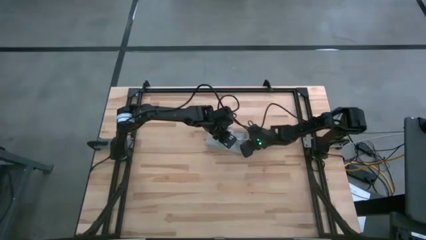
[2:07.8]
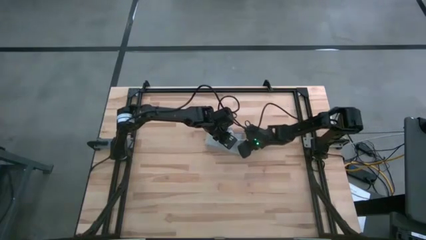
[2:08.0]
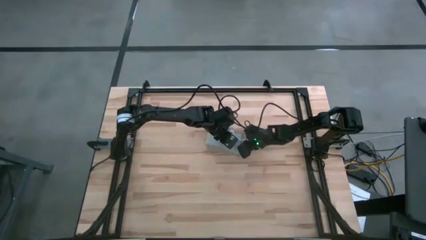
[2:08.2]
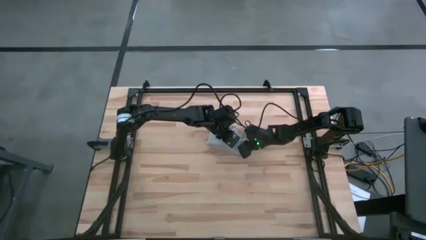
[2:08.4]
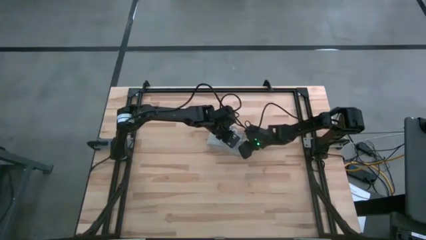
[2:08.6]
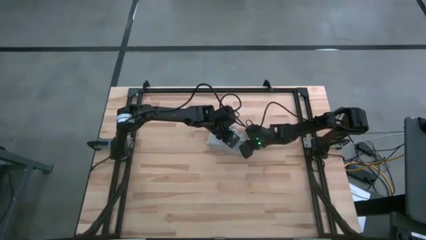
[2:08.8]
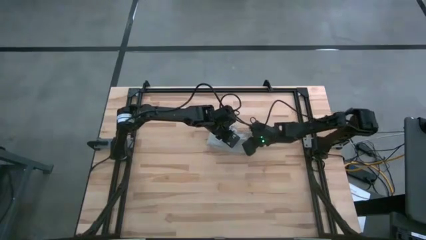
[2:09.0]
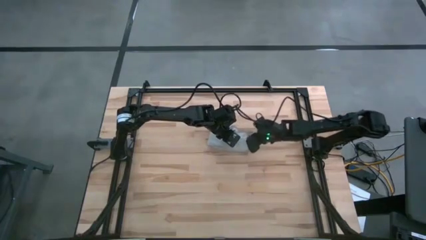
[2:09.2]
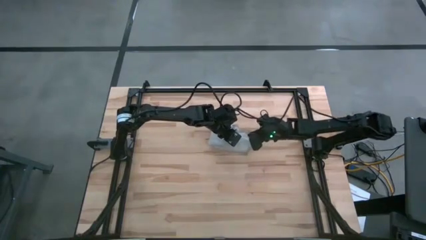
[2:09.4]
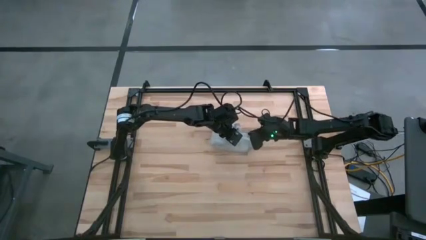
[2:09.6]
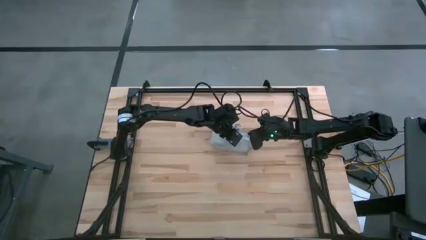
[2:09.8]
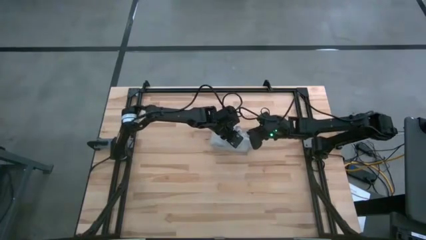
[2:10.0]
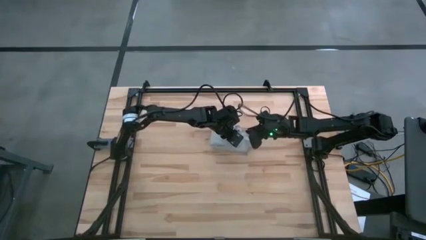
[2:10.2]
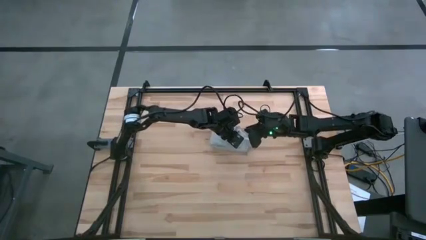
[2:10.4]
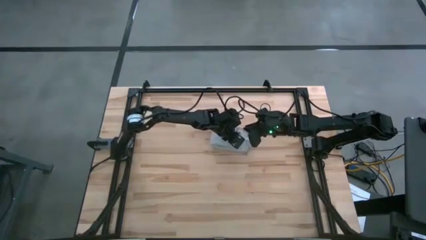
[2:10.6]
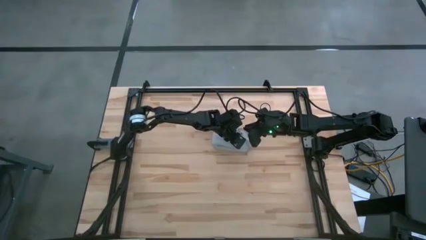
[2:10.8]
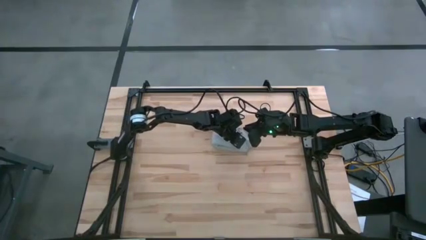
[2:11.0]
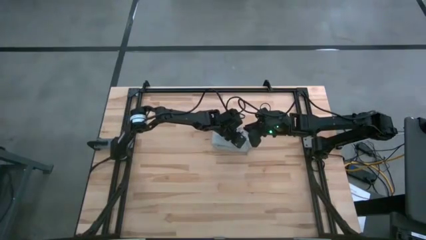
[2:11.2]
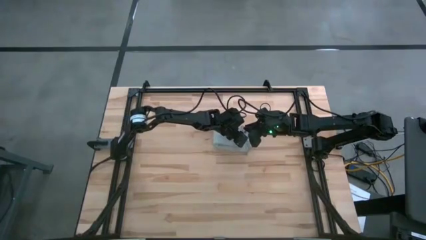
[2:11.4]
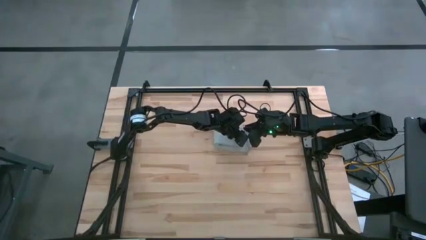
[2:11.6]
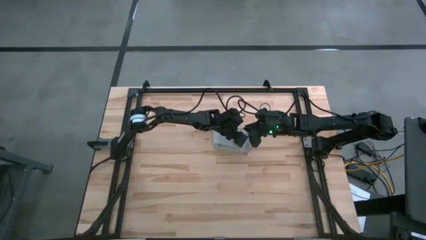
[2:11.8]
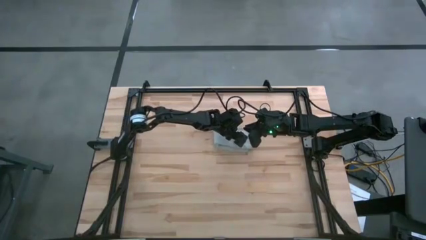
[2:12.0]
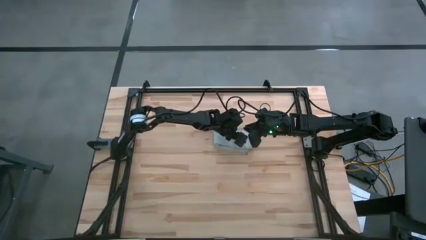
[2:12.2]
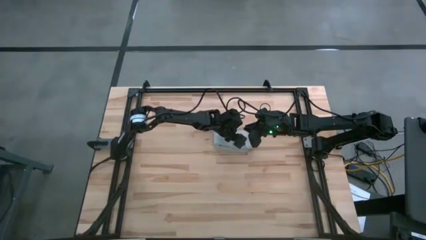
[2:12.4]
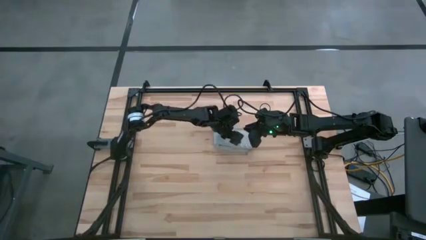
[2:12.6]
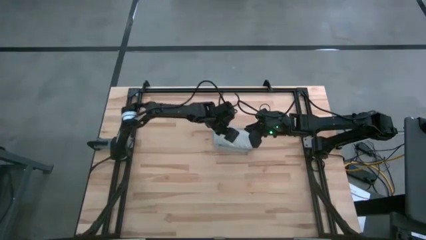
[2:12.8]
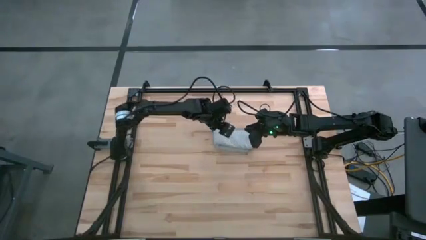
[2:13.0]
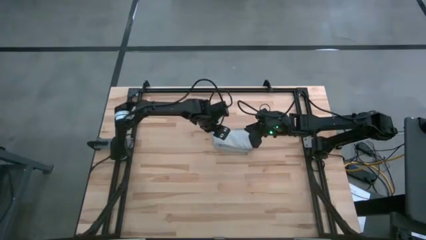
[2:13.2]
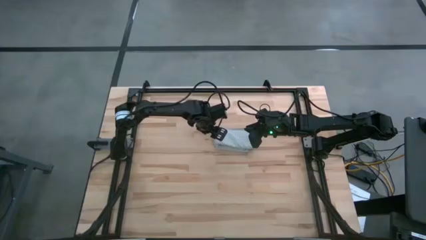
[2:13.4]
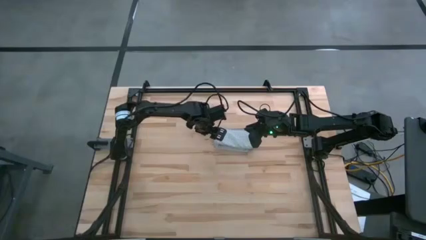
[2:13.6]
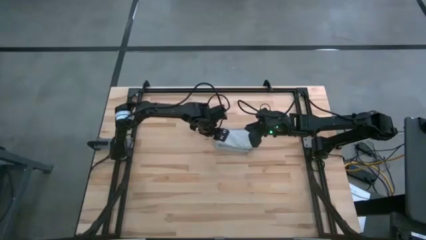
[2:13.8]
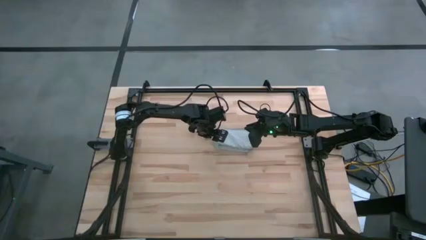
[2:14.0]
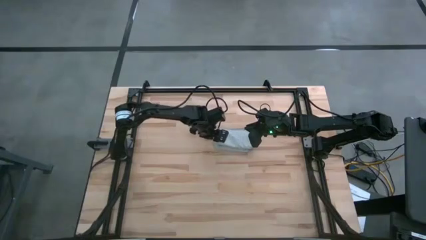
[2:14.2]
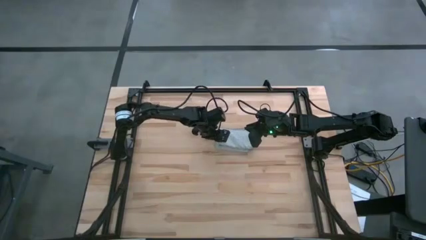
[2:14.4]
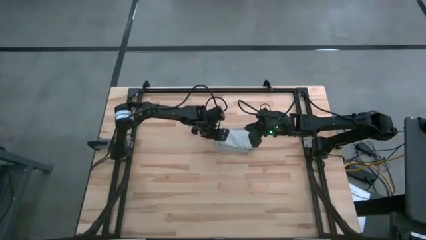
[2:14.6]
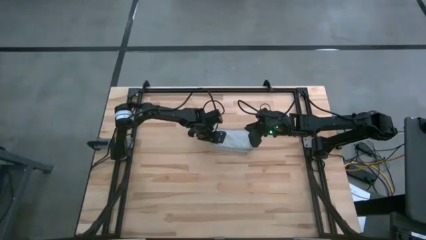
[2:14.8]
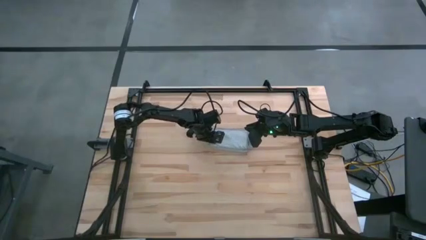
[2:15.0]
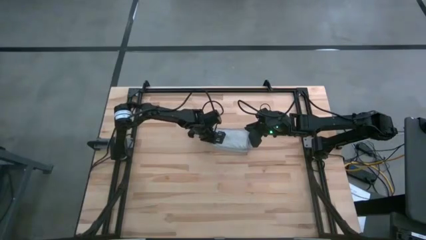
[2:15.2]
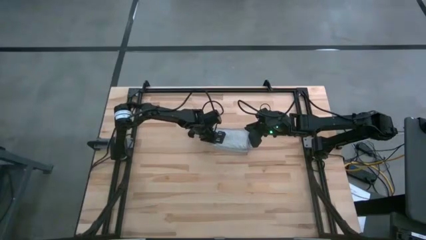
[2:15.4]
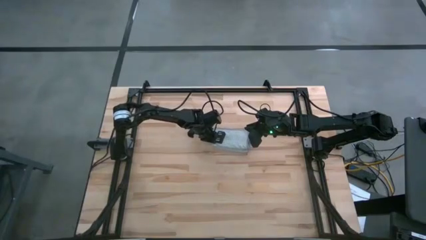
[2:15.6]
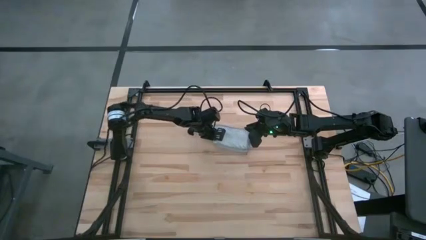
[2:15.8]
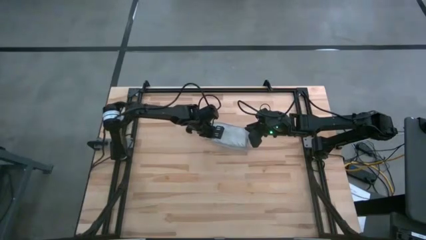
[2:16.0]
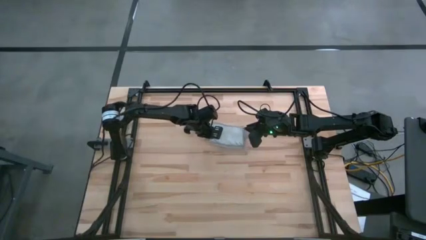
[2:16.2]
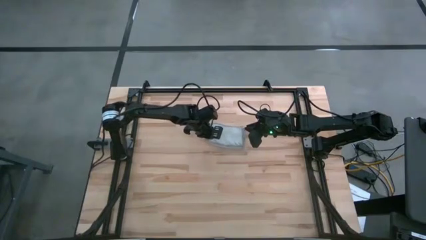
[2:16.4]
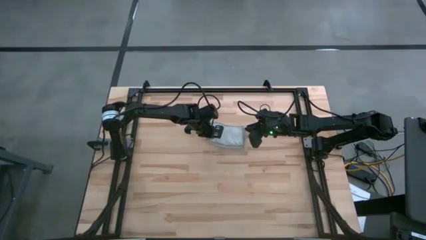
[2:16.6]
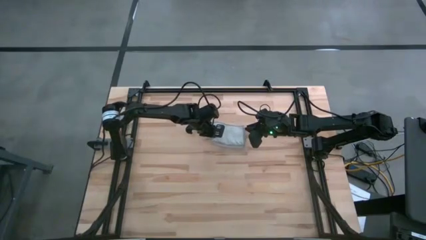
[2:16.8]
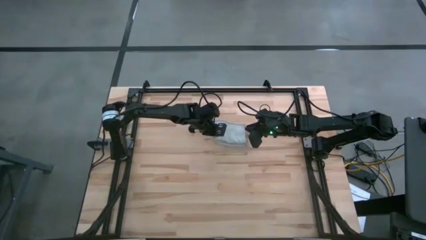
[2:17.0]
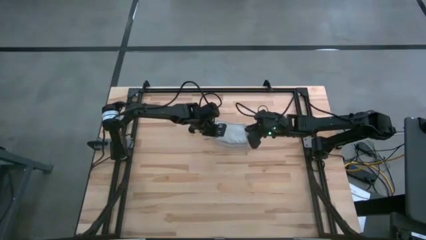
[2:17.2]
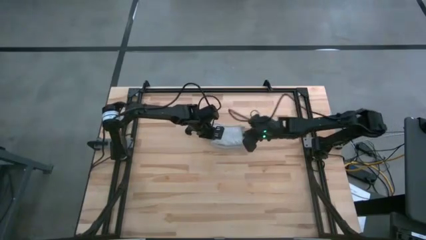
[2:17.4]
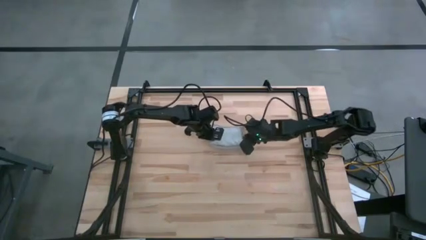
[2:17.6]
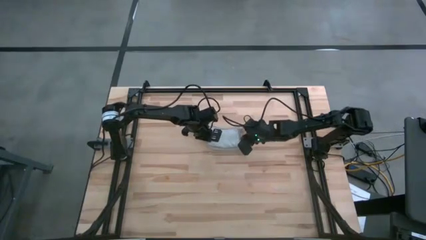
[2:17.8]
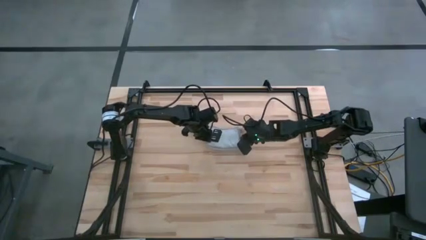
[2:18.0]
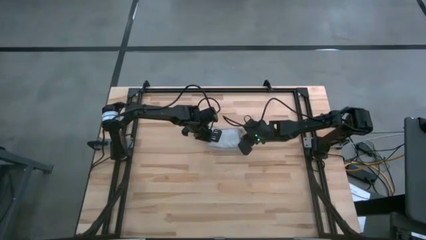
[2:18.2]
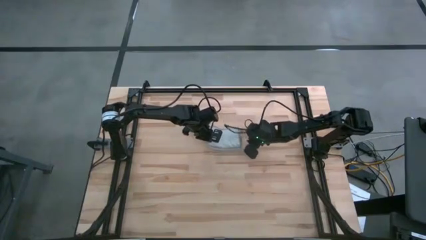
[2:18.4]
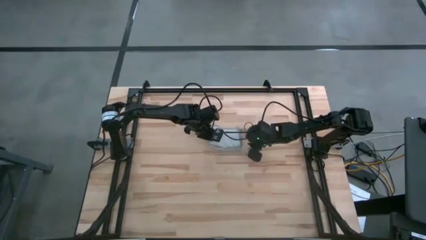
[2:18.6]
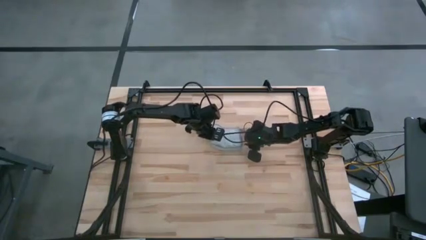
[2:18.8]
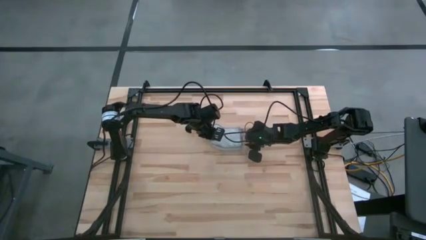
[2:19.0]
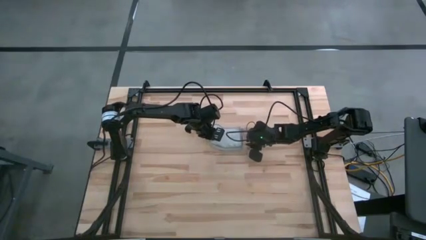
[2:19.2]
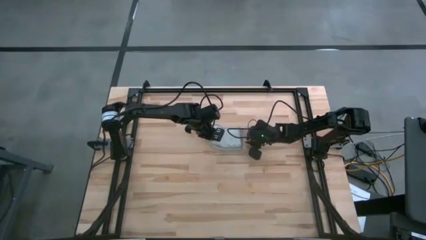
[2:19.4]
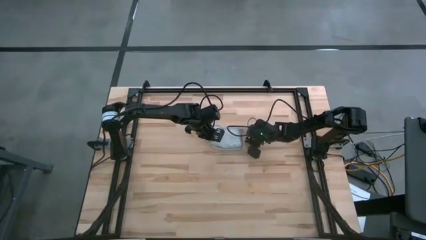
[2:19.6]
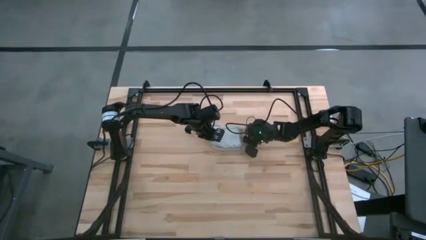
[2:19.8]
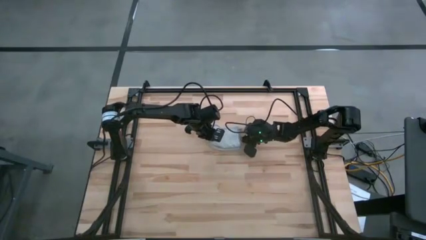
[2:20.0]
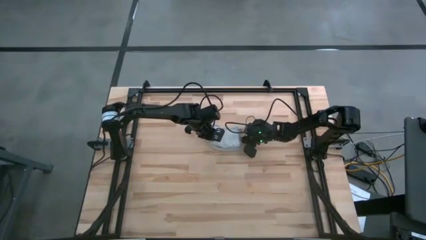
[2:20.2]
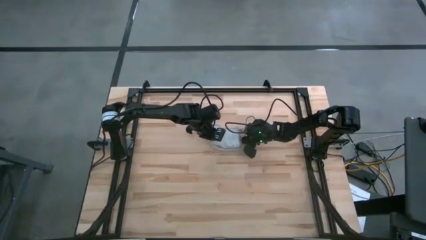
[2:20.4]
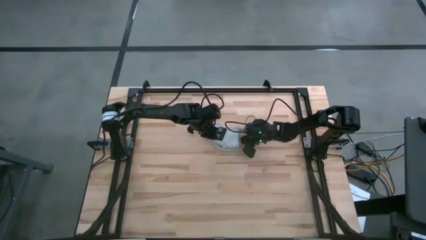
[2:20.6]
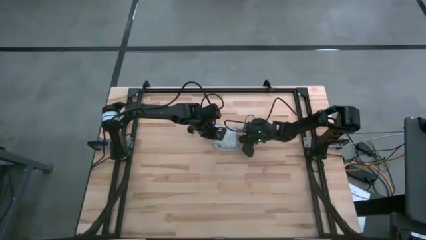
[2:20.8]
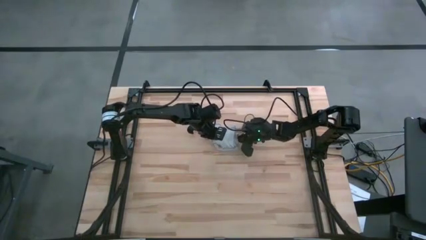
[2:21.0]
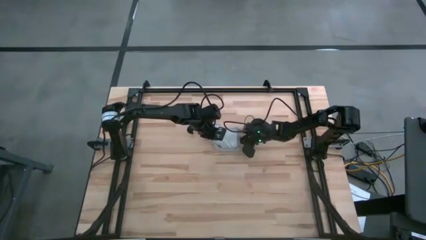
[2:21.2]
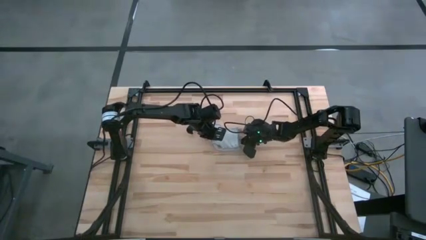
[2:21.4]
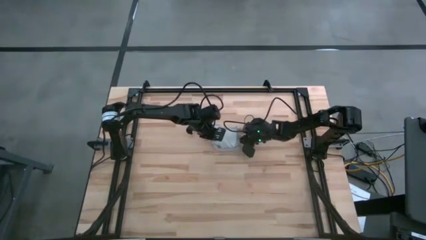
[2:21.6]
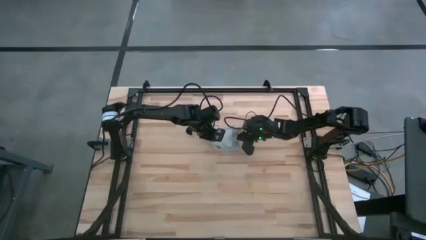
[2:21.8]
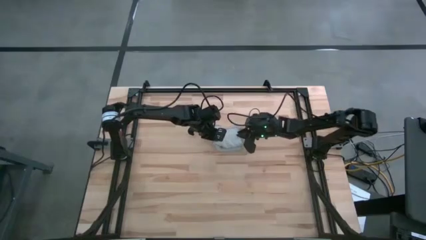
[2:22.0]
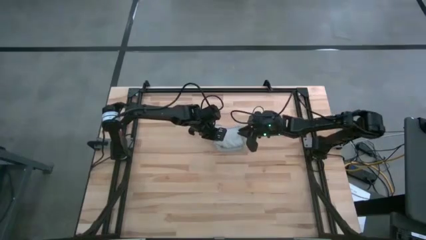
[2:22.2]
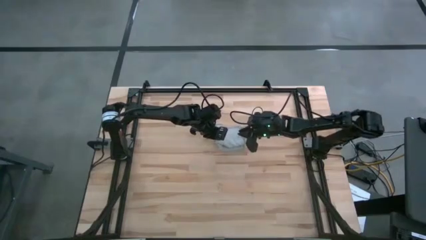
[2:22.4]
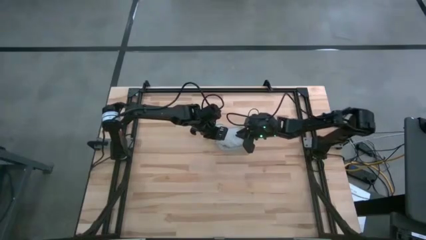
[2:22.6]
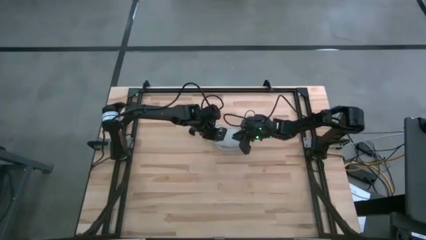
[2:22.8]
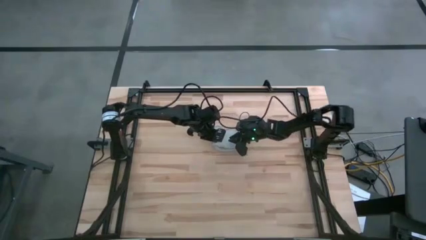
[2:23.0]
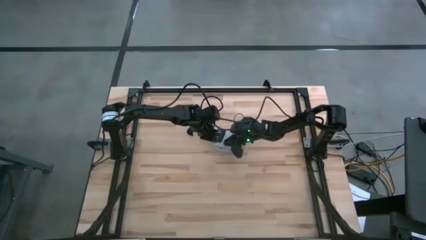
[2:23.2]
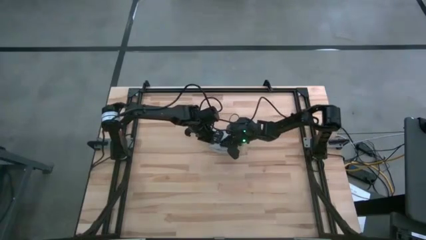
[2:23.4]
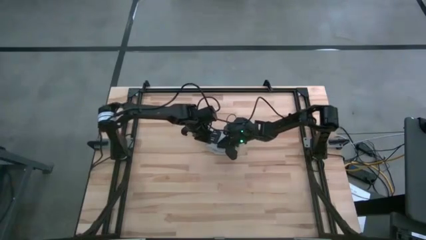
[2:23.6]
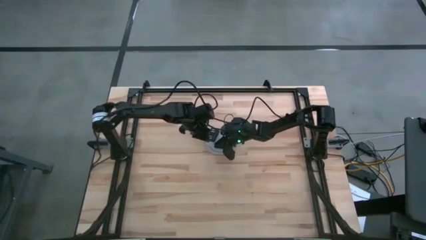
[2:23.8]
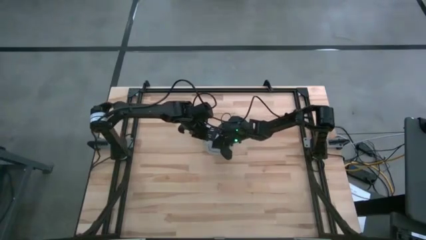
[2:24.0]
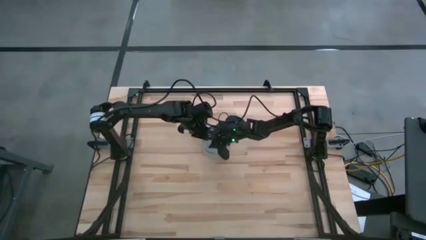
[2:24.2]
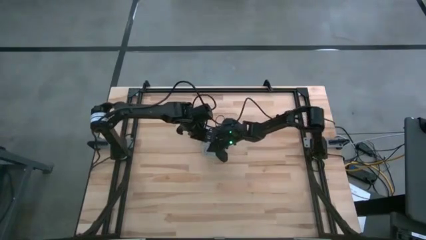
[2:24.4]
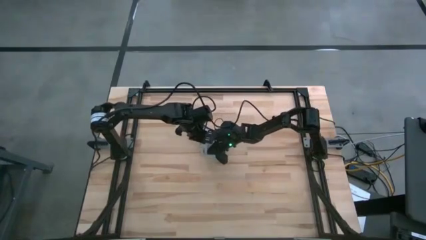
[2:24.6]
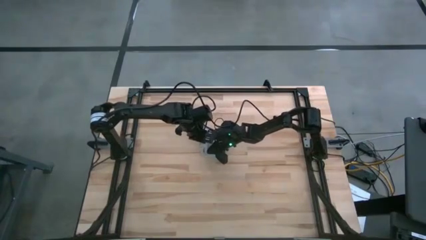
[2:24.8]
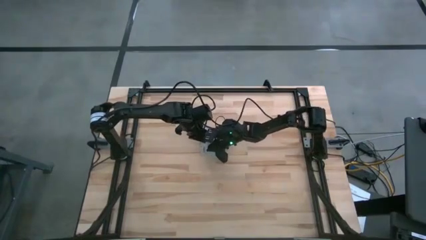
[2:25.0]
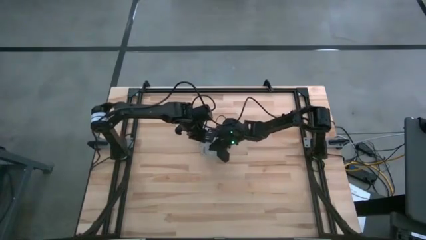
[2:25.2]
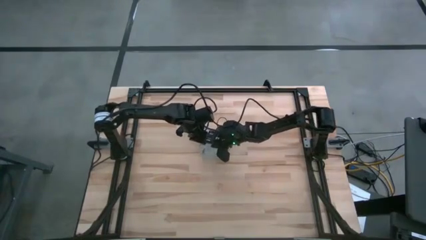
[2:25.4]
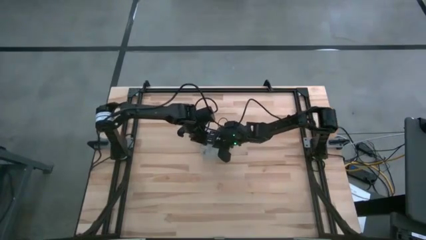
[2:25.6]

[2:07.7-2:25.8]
Task: Fold microfiber towels
Fold the gray on the table
